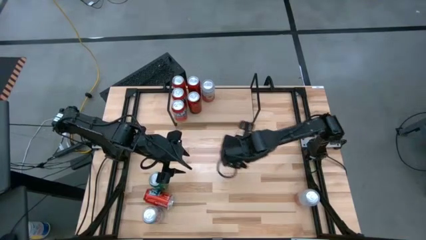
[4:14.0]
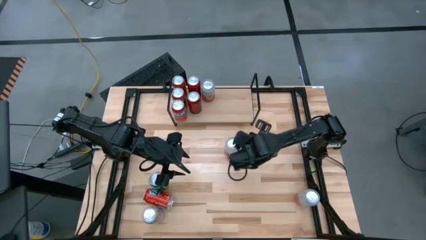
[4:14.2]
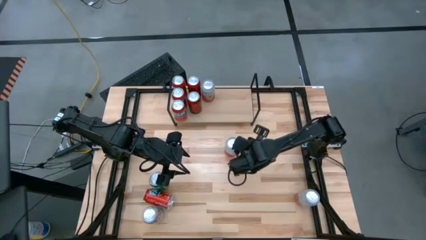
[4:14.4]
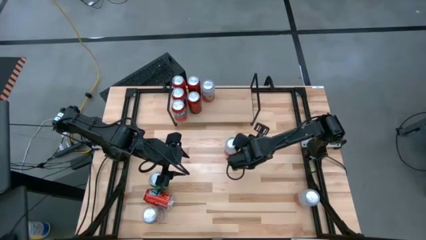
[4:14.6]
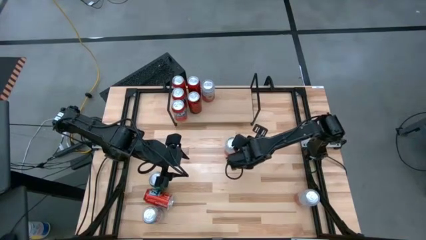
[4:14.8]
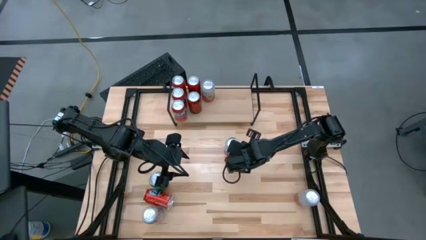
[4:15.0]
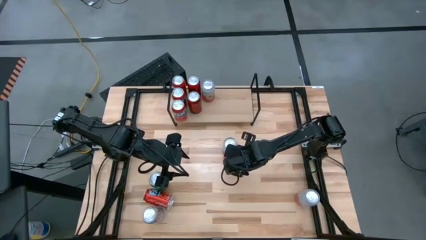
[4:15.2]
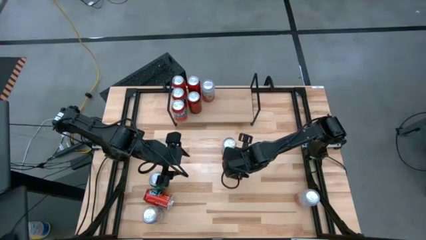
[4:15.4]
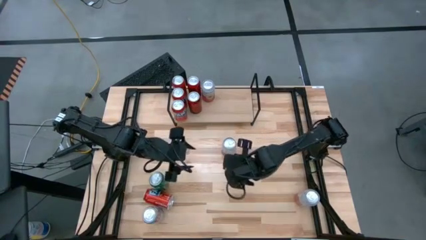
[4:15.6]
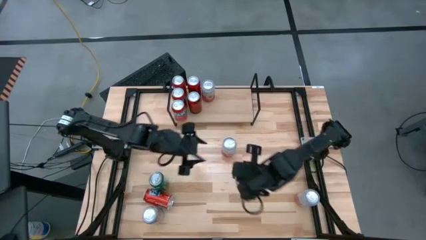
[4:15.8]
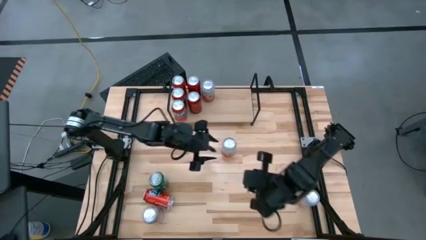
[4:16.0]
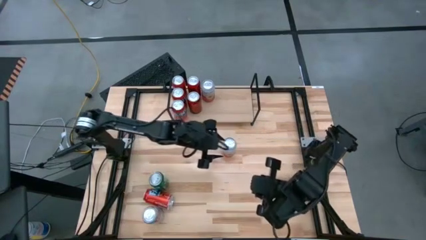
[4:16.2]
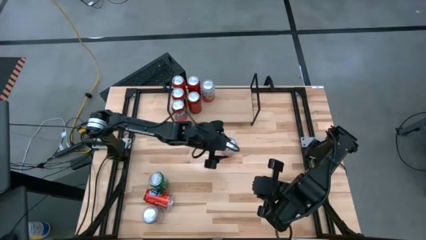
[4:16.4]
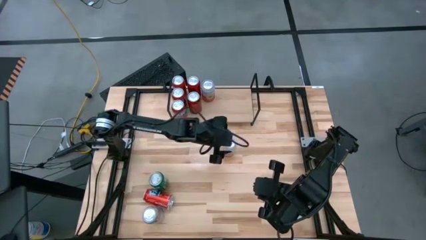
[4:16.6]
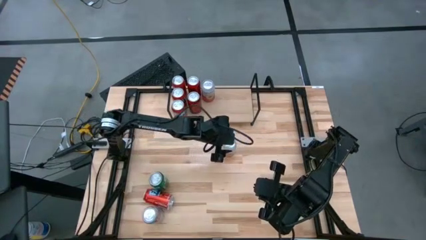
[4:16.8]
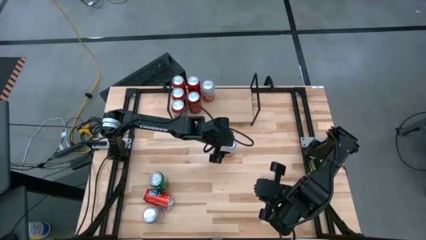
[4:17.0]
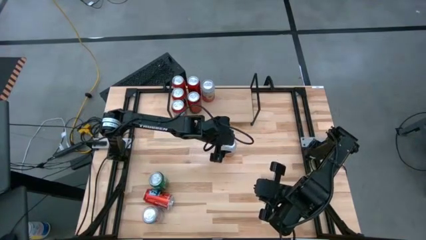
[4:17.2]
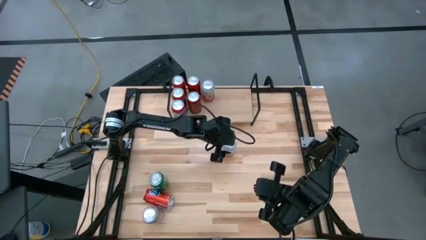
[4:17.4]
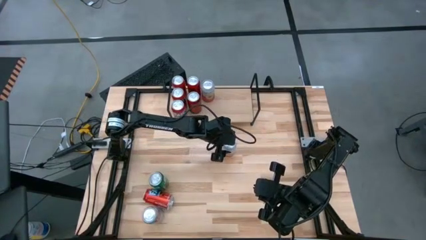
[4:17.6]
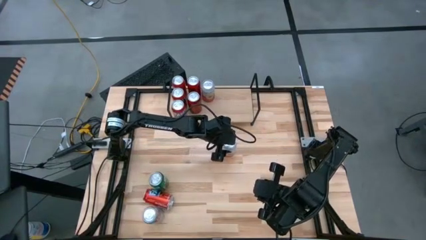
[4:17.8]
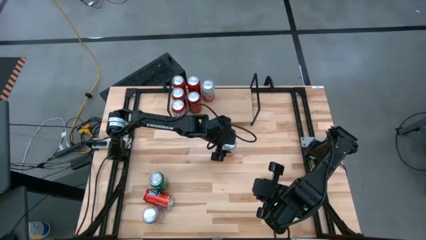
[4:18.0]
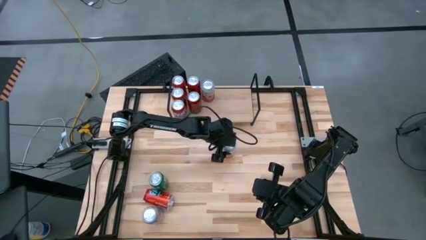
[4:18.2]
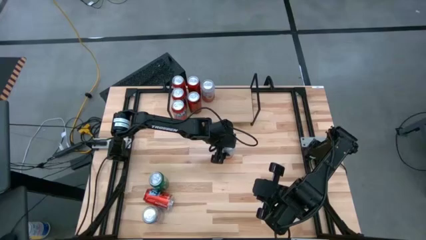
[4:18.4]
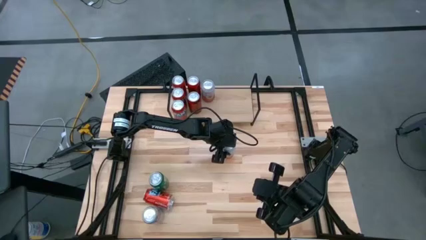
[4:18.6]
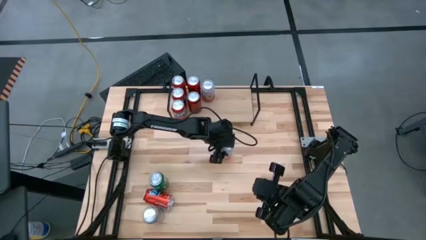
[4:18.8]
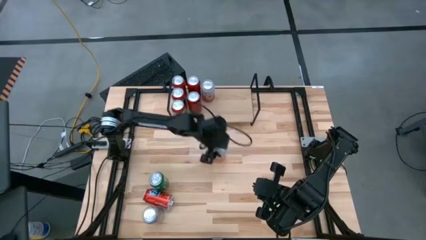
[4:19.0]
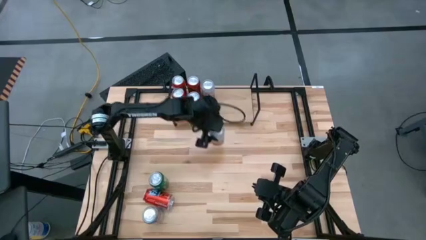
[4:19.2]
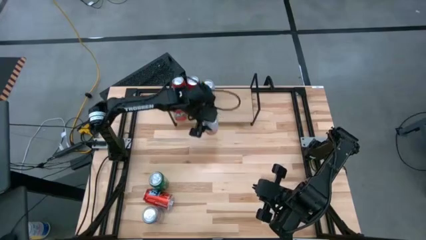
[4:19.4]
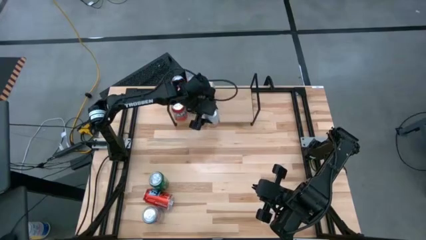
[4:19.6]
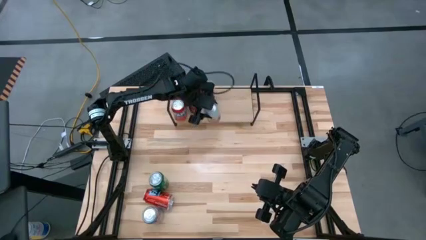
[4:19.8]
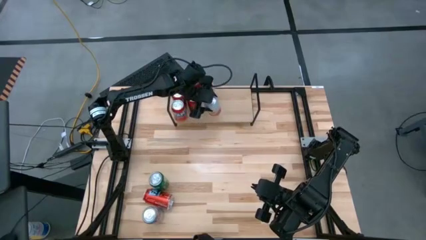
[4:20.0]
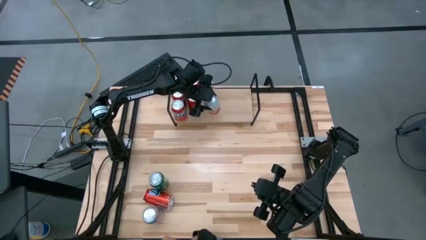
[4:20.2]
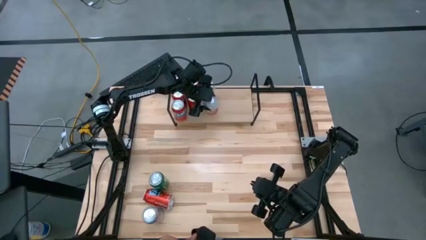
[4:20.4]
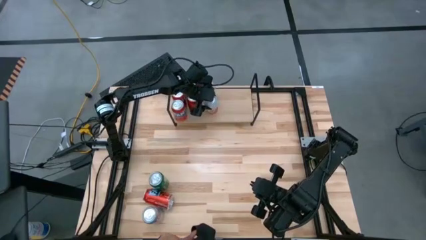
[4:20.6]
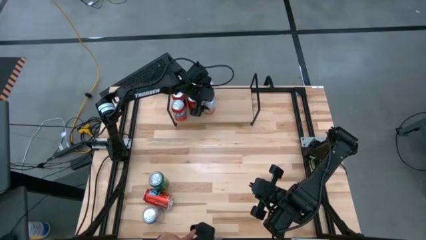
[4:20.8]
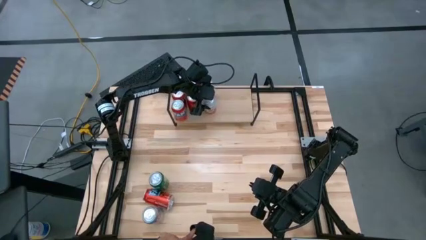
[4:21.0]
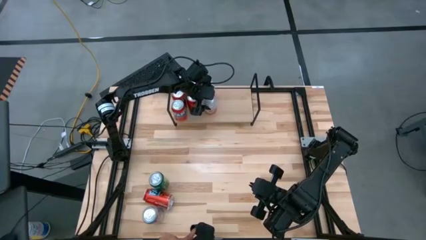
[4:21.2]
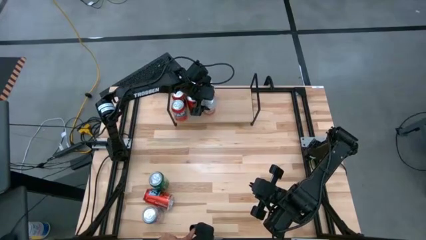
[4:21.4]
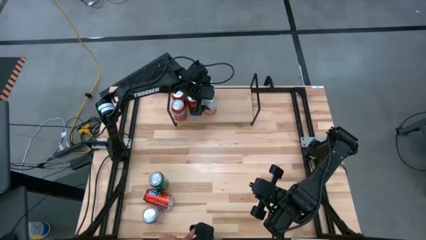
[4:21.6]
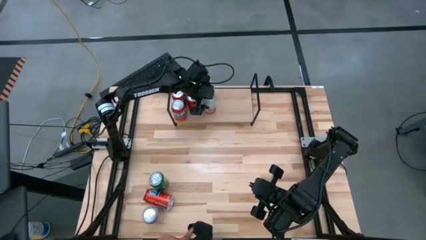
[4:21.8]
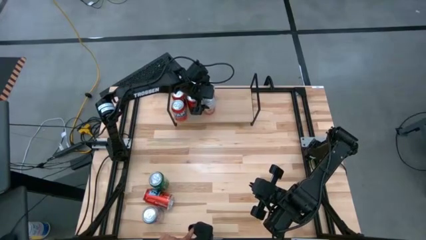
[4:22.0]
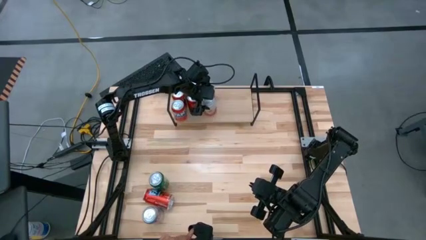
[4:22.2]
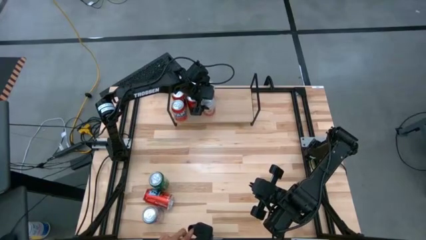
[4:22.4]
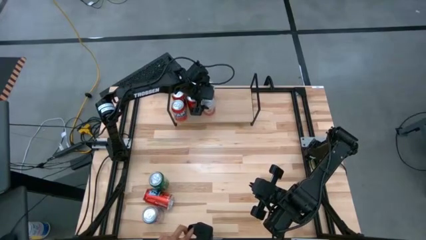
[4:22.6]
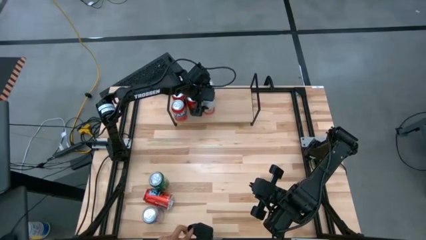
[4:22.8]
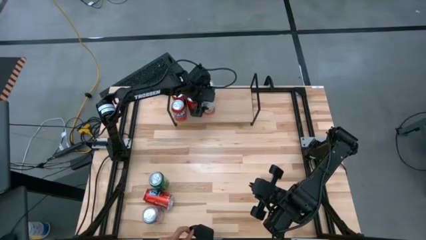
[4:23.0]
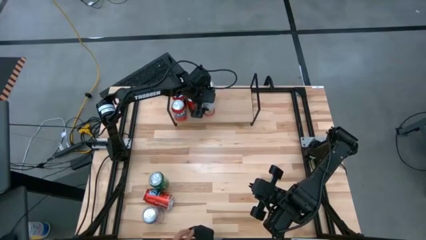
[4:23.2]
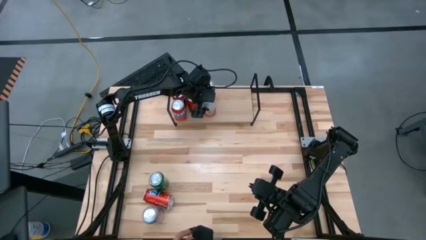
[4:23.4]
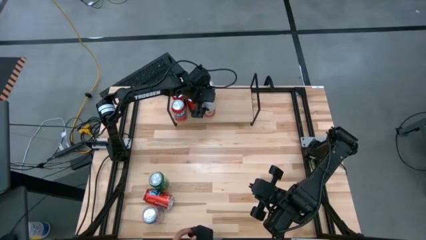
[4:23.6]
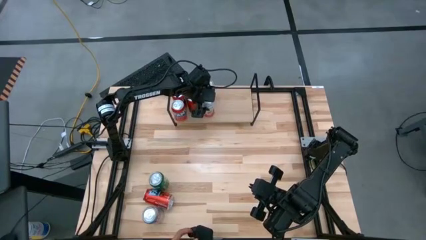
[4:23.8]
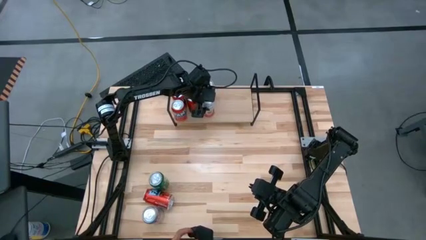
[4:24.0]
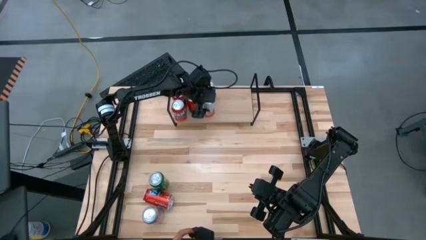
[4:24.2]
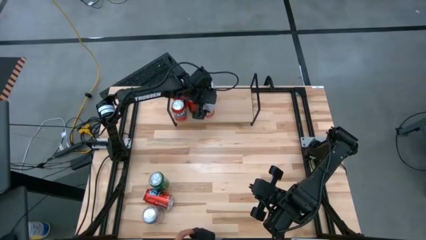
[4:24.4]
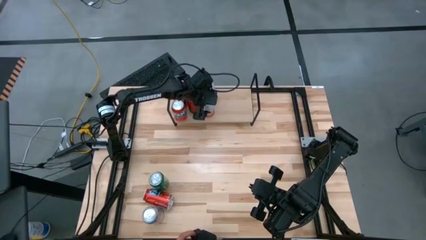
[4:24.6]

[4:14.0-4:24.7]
Task: Place canned beverage on shelf
Put the pink white soda can on the shelf and align with the other pink white soda can

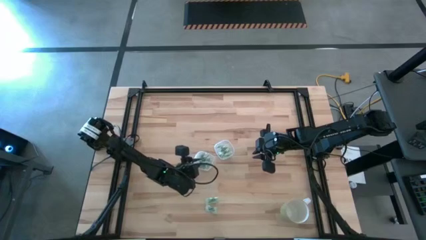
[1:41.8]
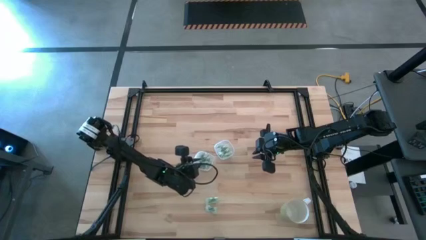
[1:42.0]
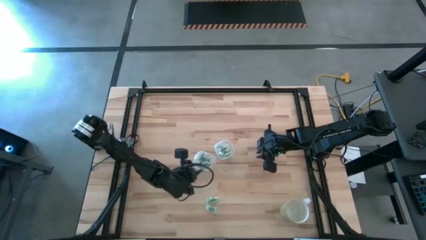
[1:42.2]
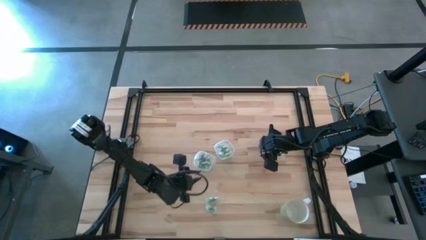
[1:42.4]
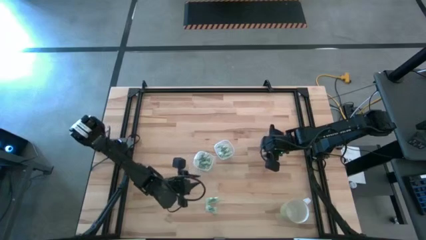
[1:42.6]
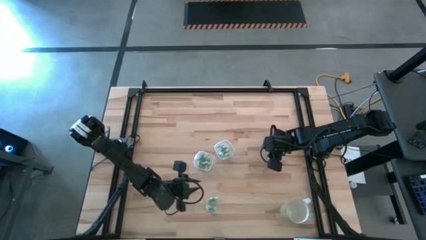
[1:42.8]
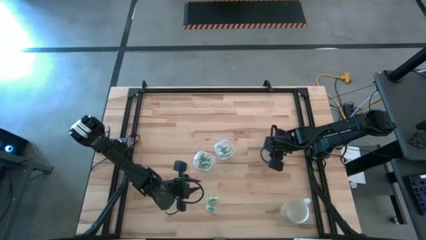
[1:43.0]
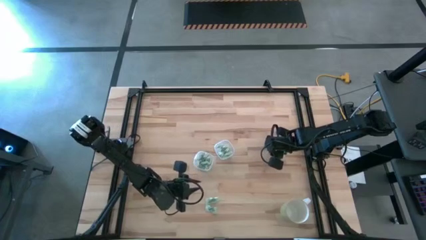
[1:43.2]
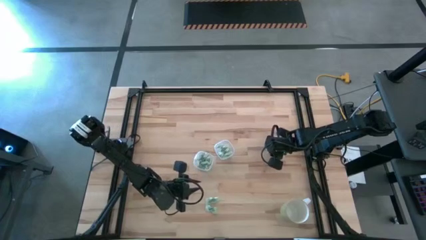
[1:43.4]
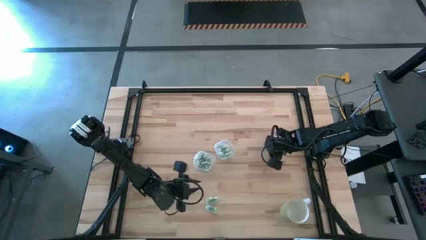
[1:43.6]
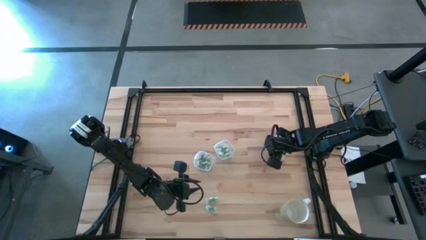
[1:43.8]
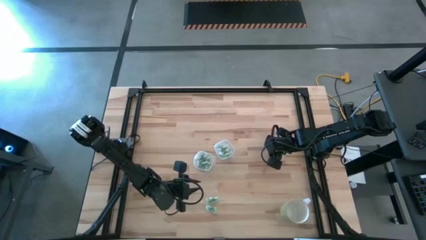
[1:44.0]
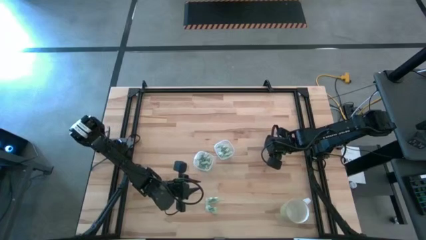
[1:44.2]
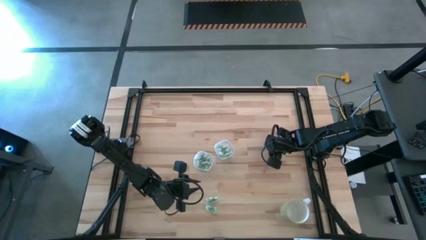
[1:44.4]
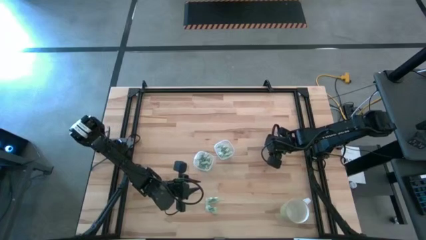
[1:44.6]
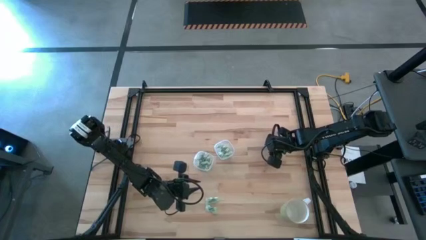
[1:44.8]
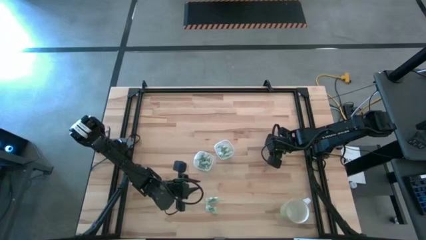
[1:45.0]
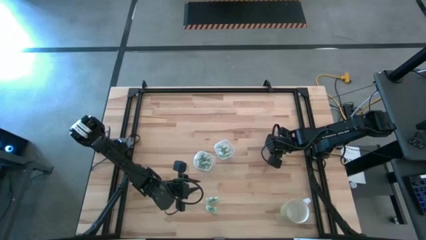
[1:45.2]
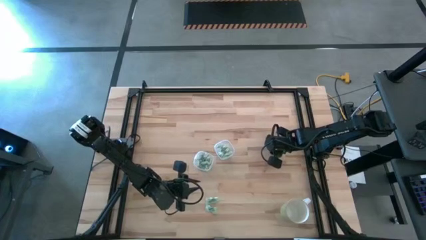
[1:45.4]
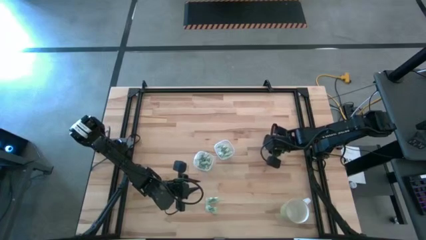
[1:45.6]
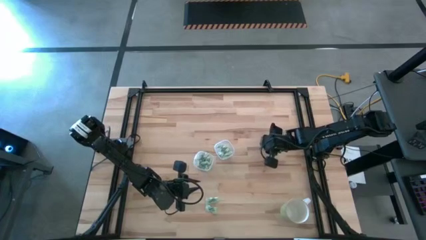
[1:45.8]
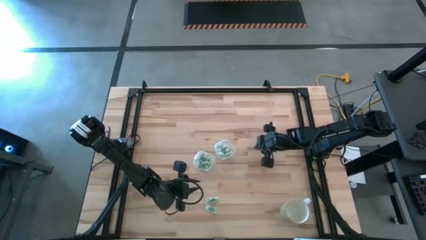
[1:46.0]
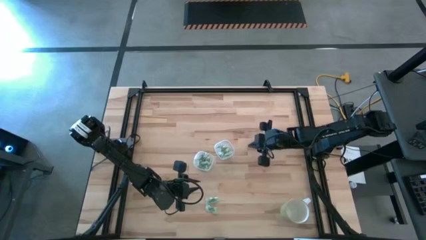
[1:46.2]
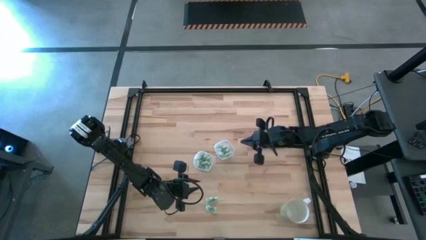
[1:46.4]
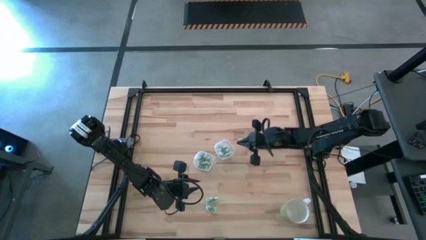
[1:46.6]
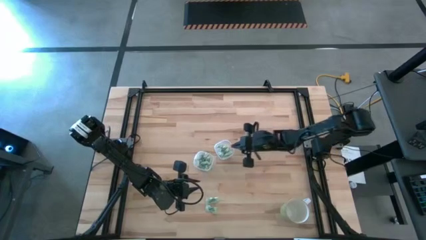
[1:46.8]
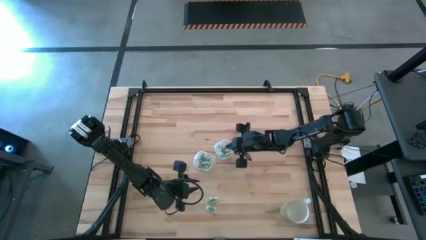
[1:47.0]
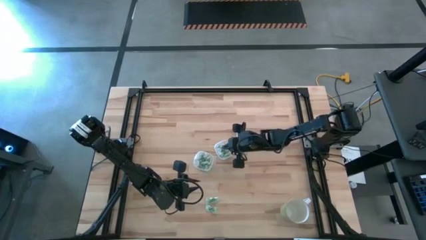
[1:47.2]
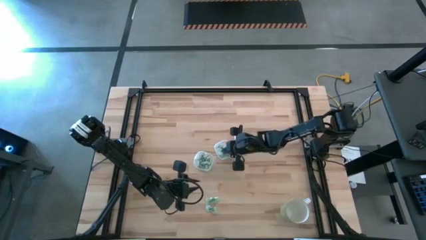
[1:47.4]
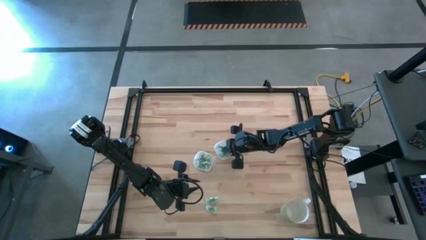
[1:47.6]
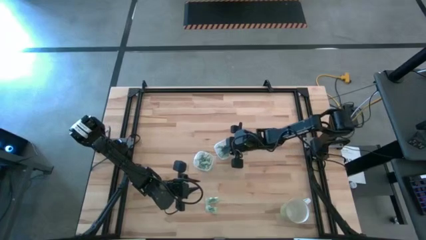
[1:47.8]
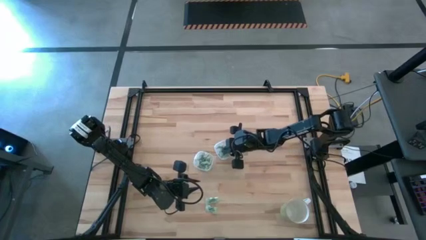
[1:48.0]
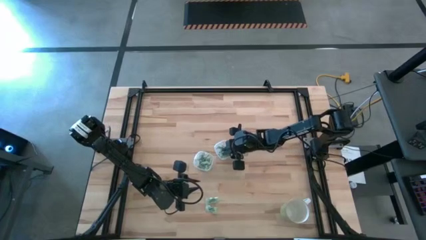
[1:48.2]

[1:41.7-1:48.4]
Task: Pick and place items into bin
Put the stevia packet into the right bin
